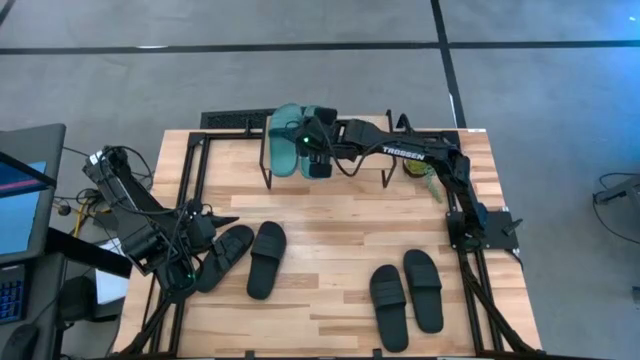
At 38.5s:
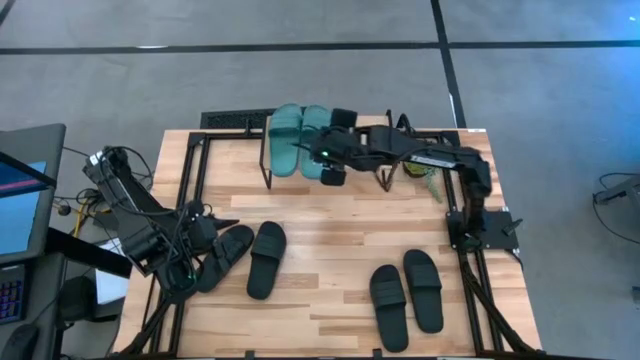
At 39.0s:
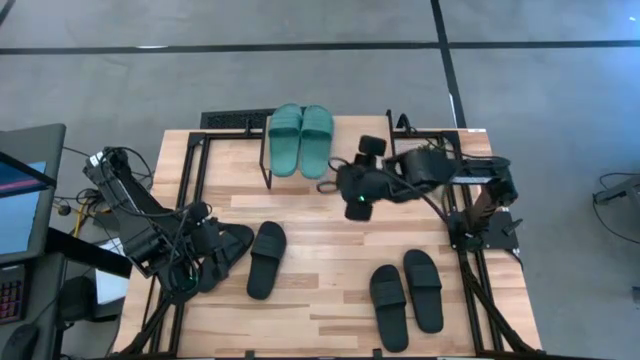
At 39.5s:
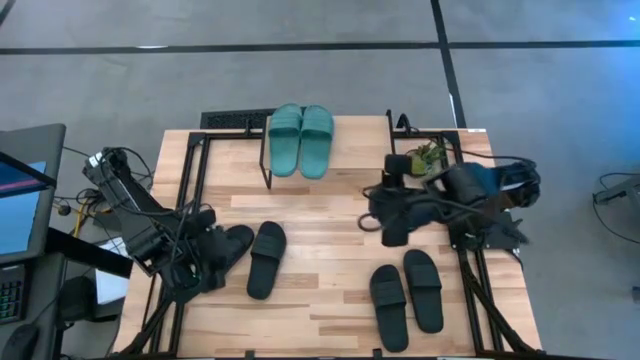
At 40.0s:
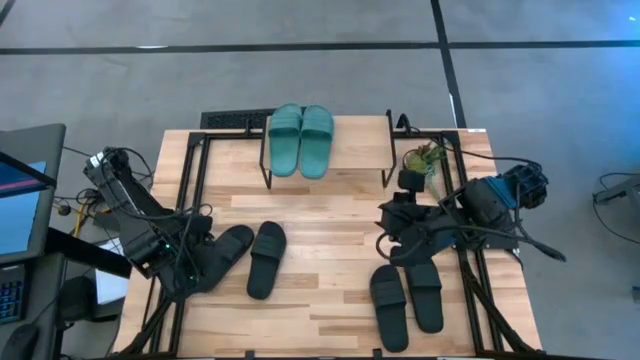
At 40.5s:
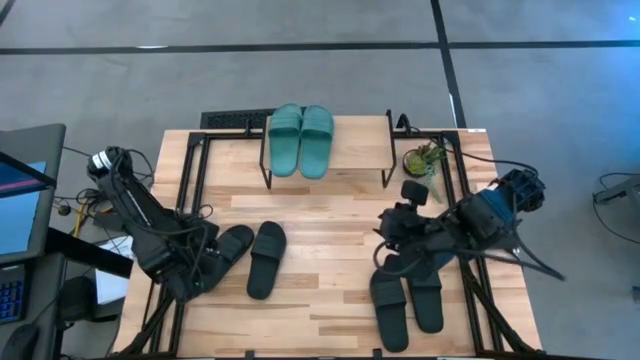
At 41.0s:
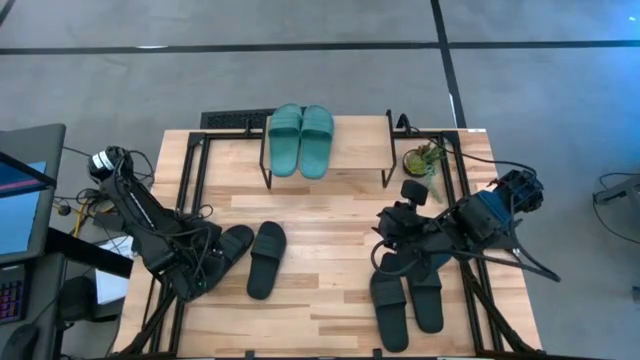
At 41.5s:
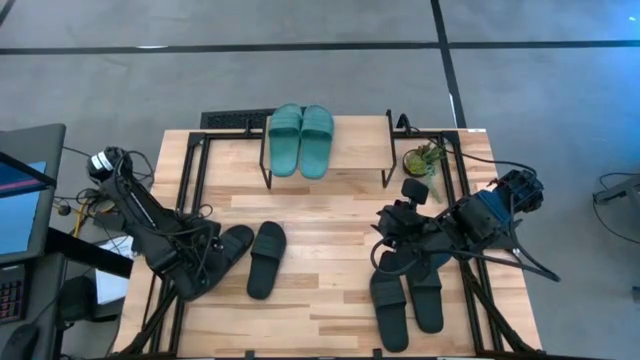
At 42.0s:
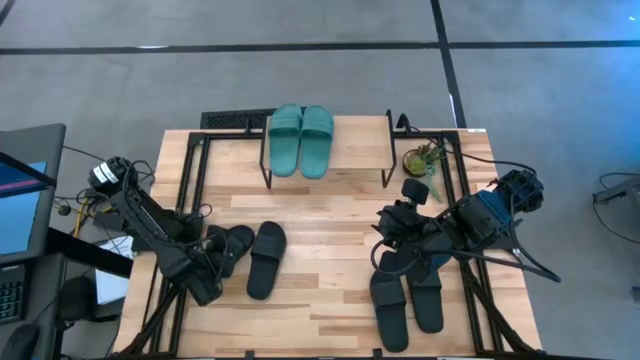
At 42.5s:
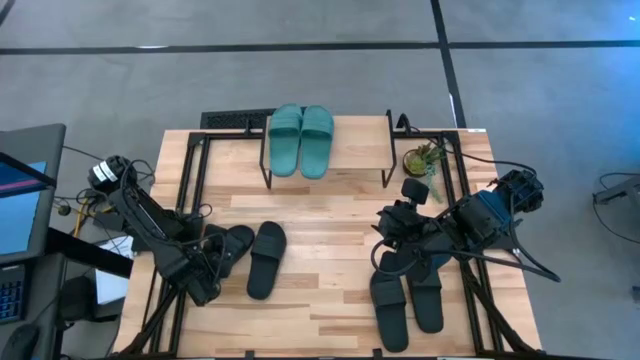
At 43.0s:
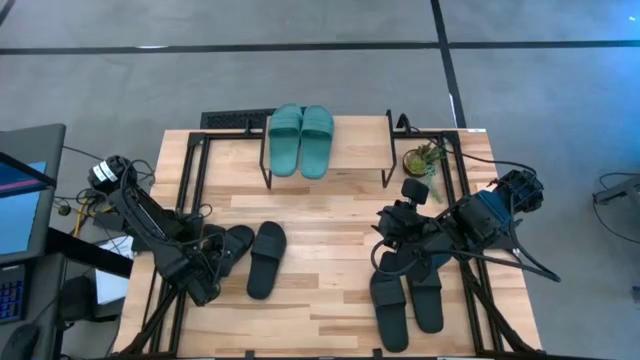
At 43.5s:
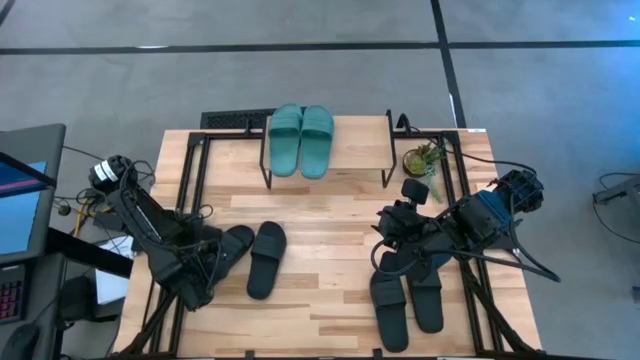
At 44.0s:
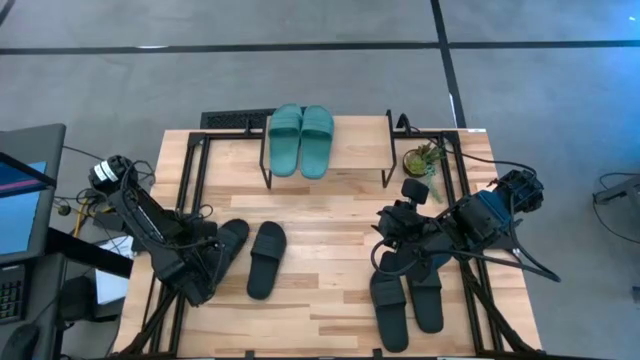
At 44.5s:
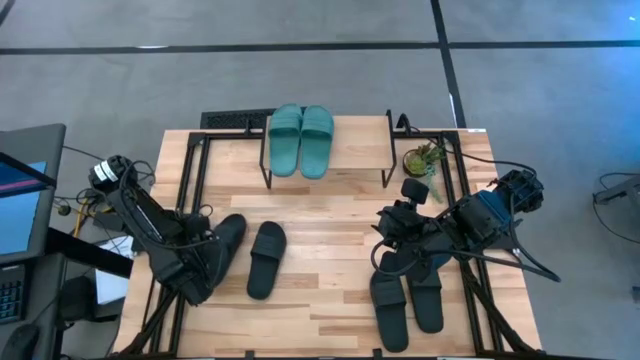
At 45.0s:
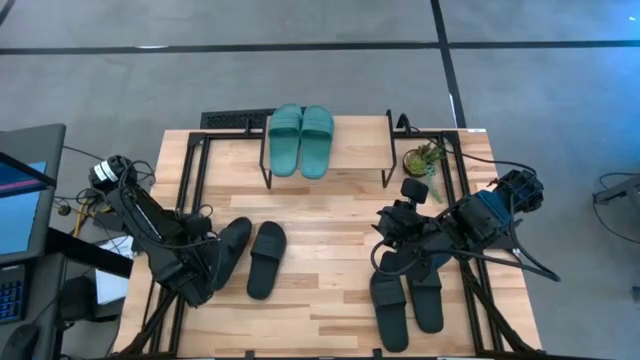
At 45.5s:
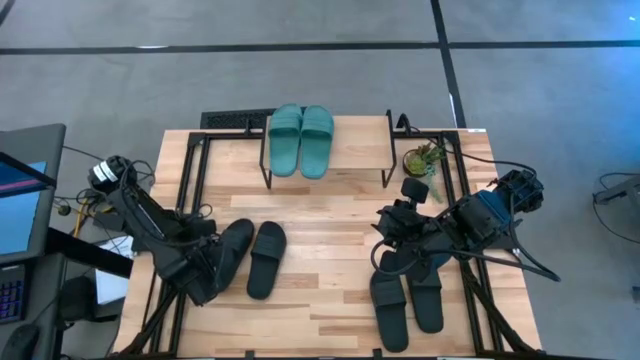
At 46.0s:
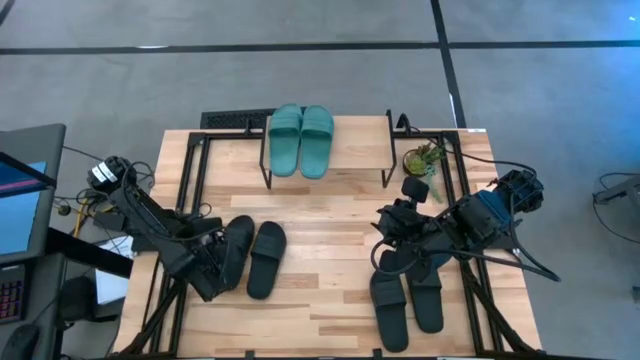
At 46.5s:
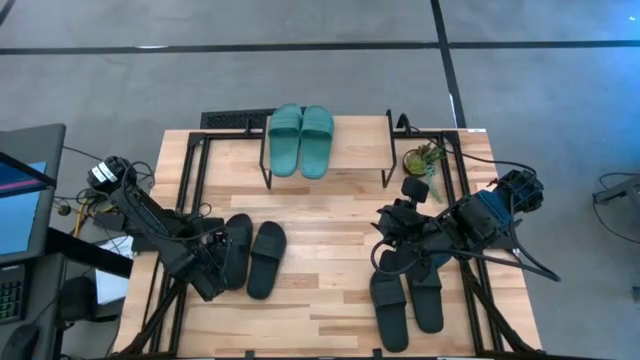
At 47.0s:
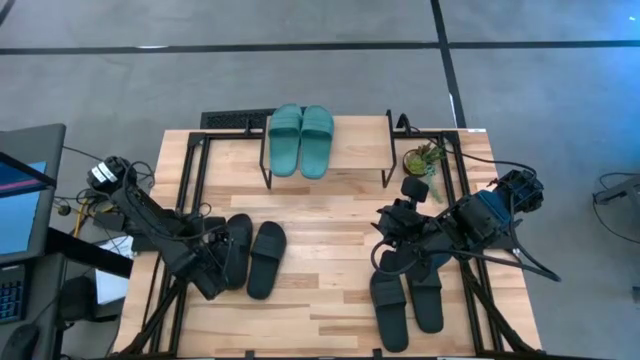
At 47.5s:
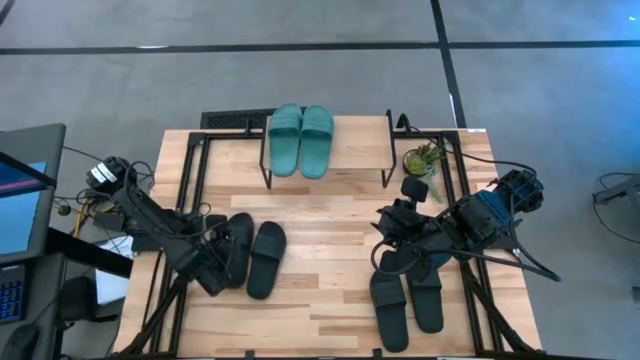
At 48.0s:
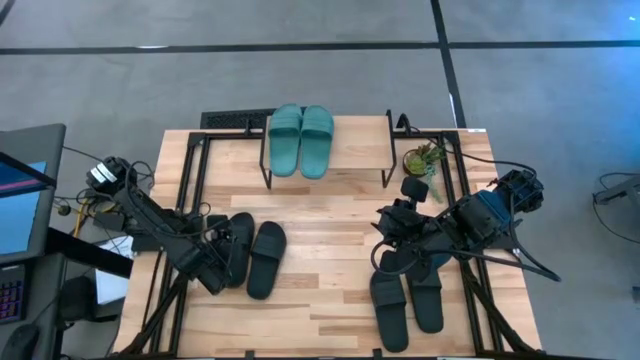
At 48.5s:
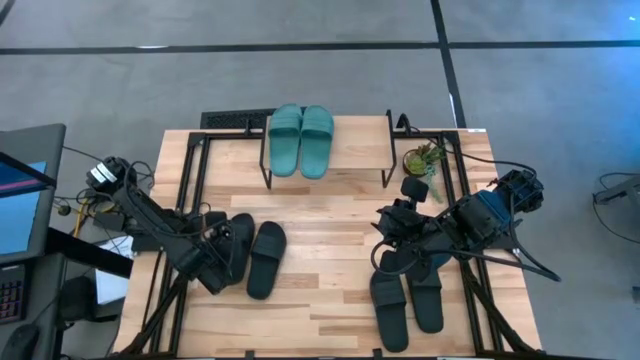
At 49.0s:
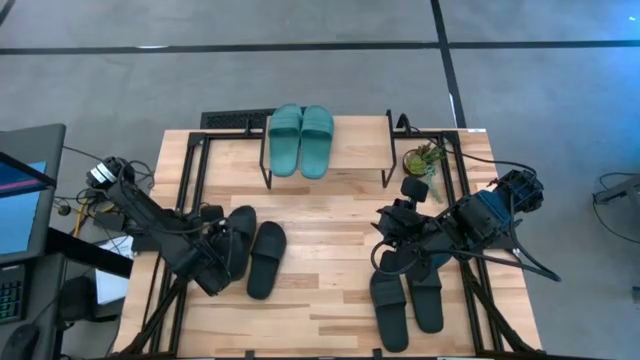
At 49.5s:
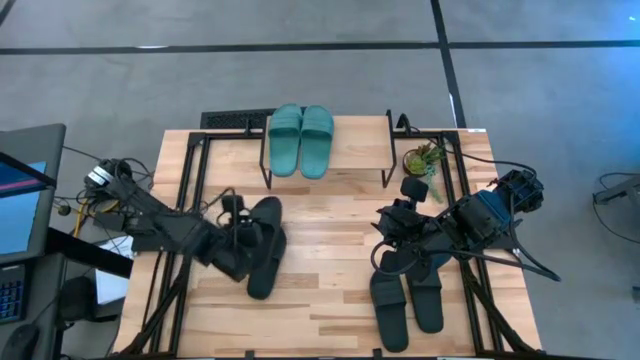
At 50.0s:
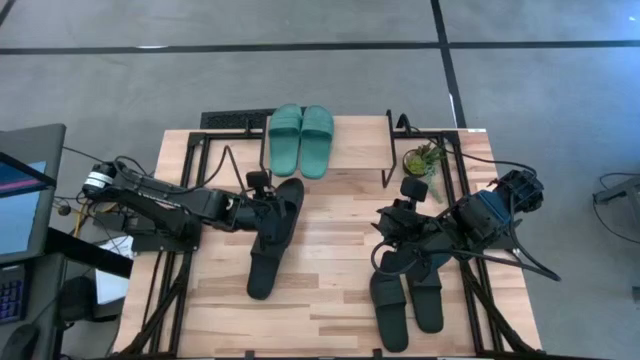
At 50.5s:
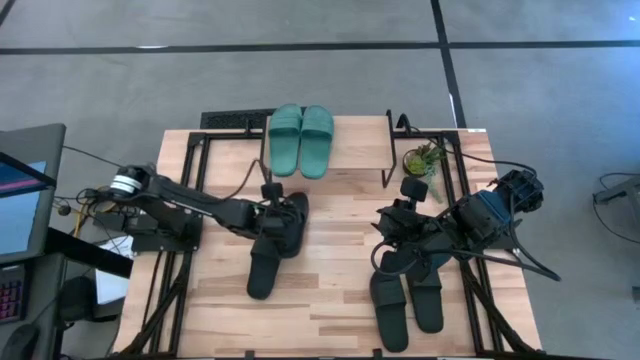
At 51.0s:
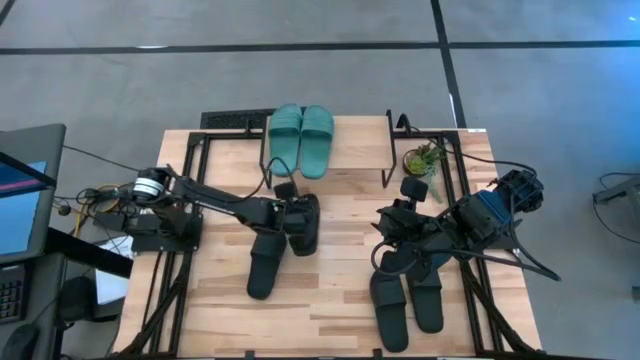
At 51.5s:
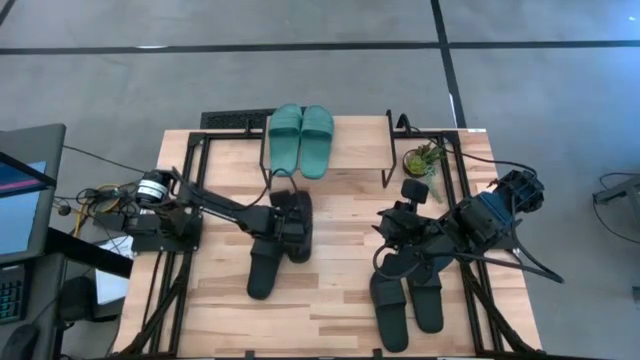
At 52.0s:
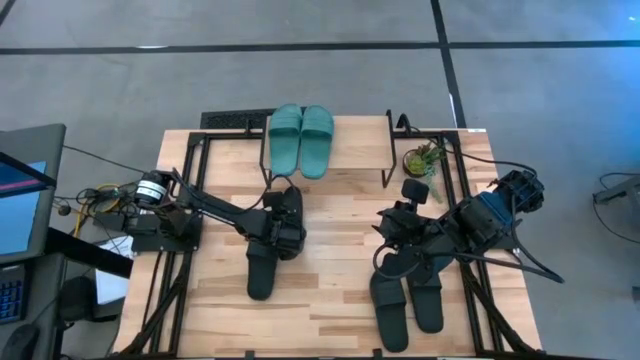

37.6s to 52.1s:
Task: Pick and place slides into the shelf
Put the left black slide under the shelf

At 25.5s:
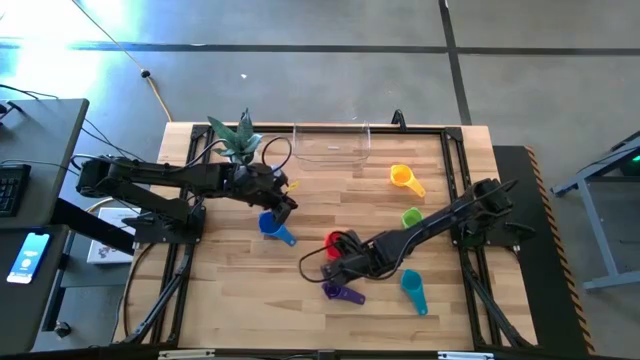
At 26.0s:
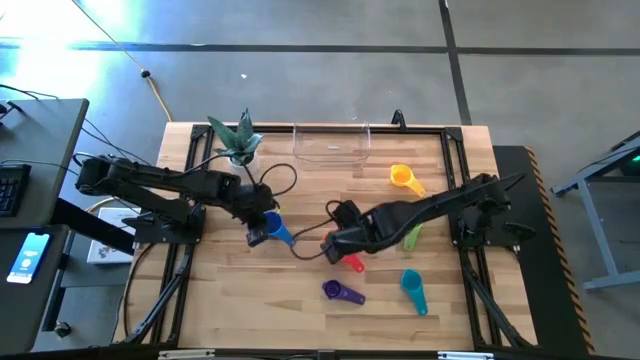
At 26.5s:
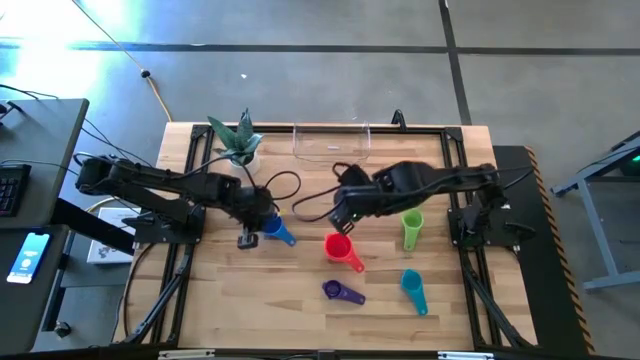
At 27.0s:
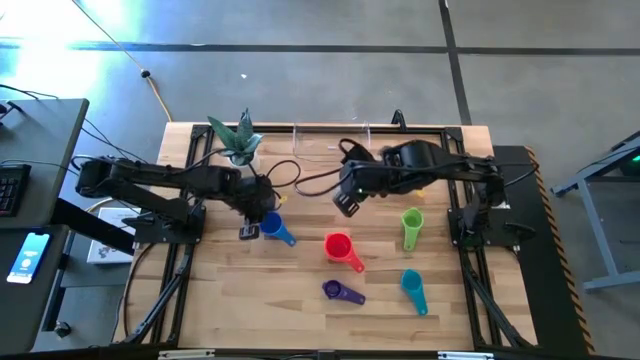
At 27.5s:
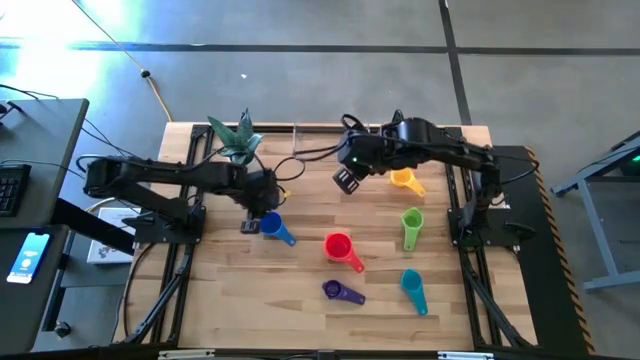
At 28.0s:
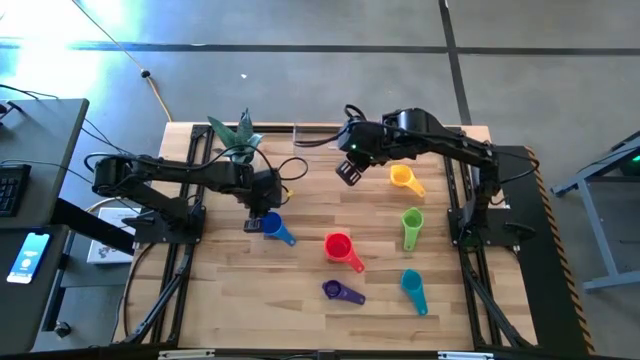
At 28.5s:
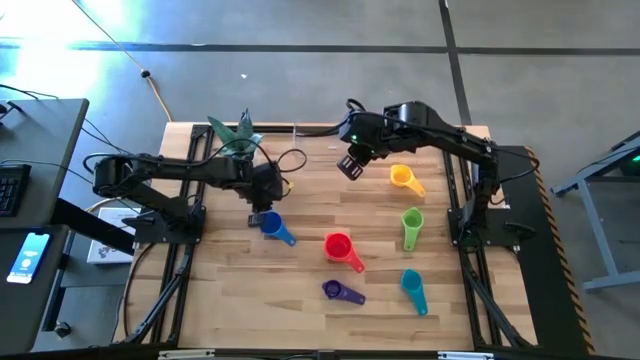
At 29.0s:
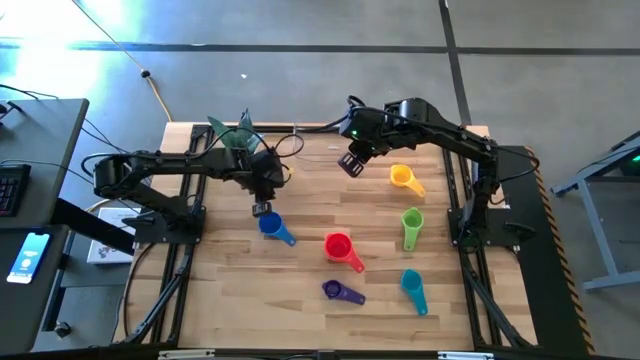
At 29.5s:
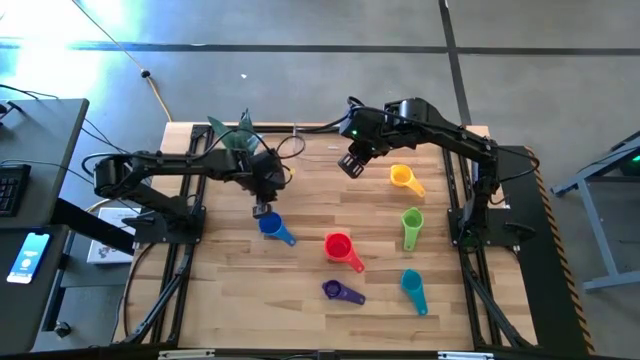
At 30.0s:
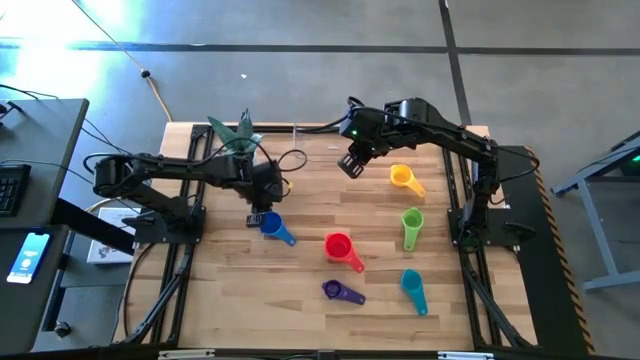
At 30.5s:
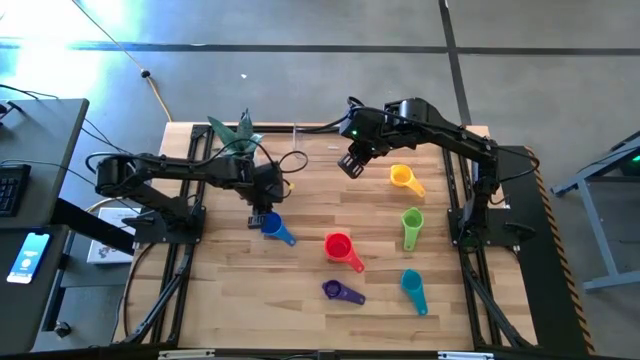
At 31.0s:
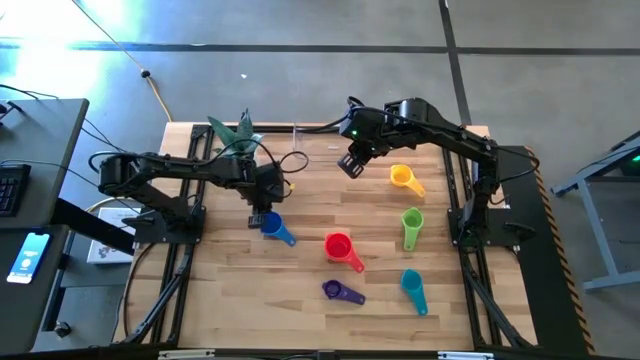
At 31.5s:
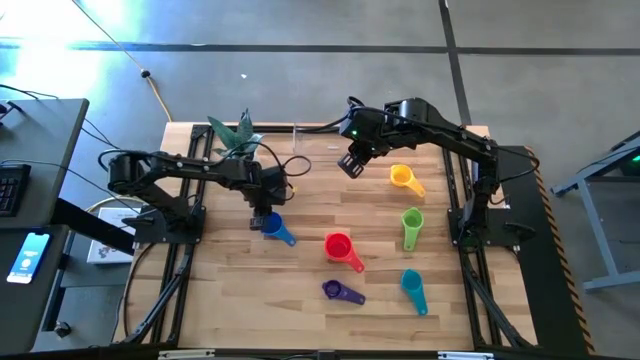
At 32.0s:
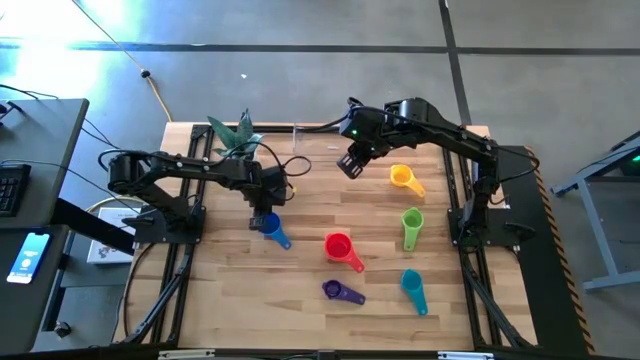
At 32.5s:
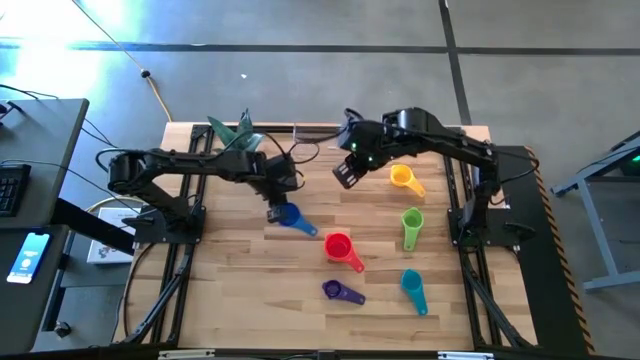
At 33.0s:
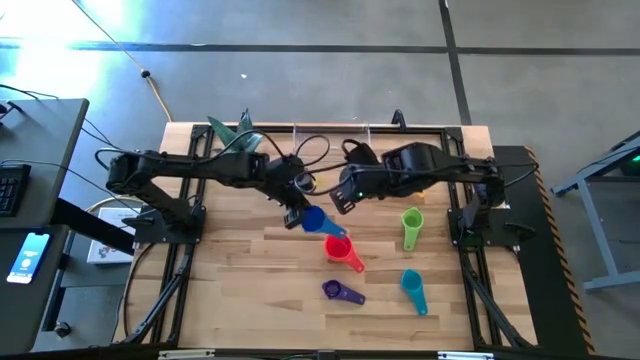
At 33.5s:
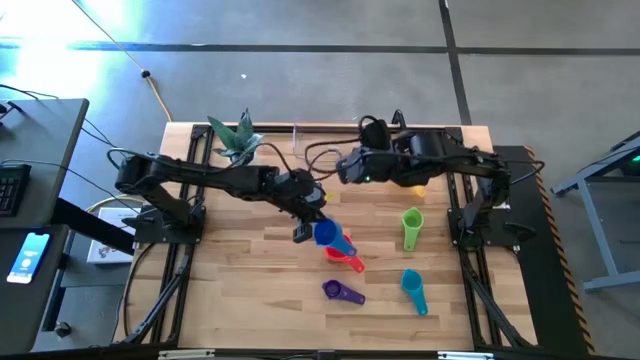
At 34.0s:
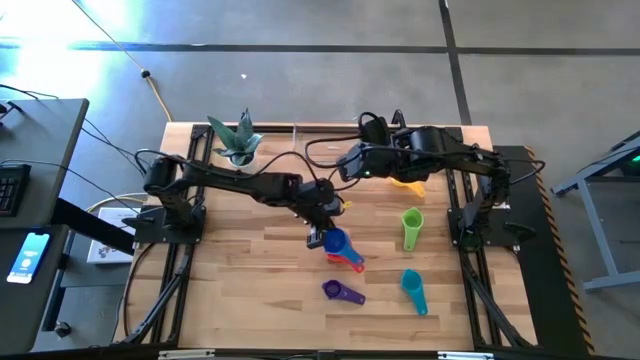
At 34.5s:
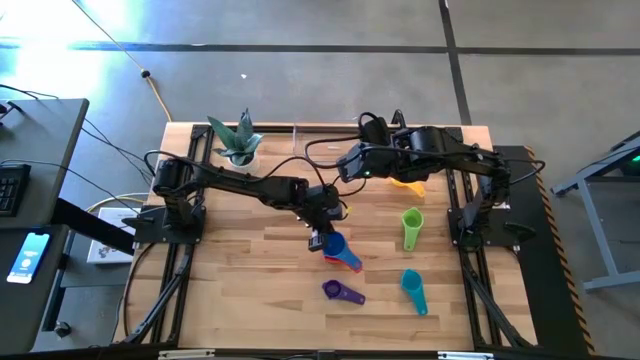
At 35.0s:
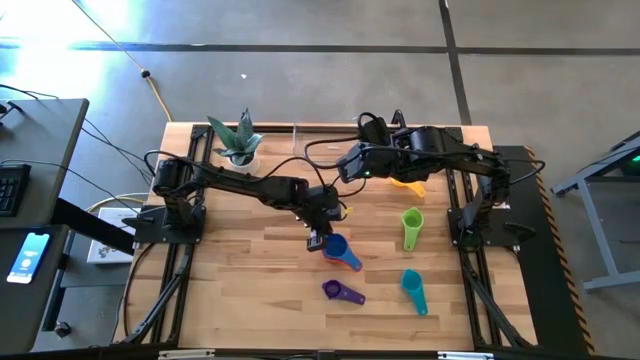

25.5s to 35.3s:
Task: Nest measuring cups in basket
Stack the blue measuring cup on top of the red measuring cup
